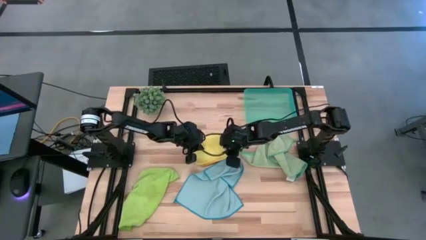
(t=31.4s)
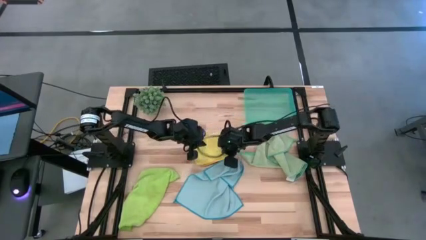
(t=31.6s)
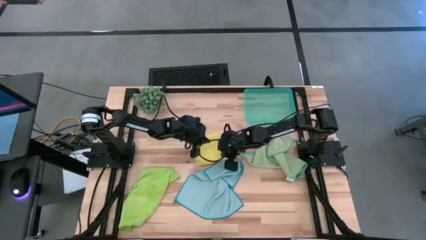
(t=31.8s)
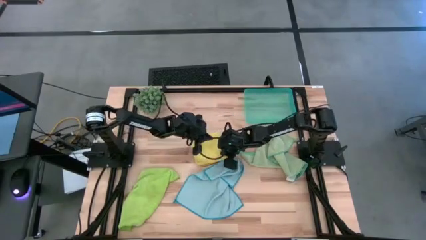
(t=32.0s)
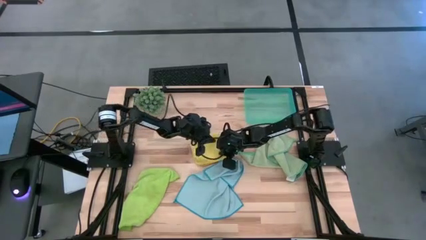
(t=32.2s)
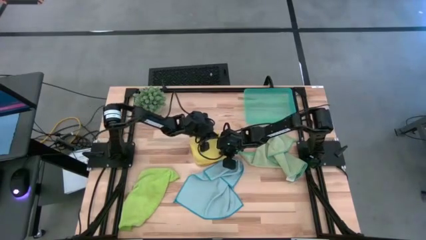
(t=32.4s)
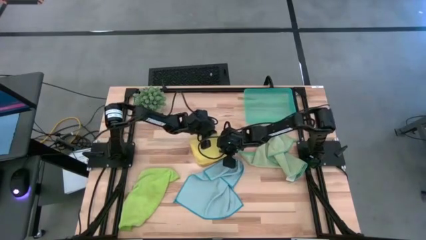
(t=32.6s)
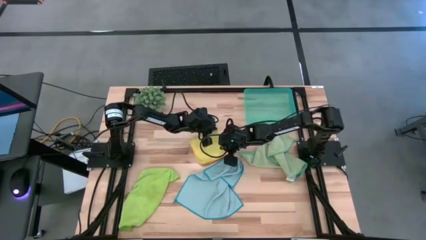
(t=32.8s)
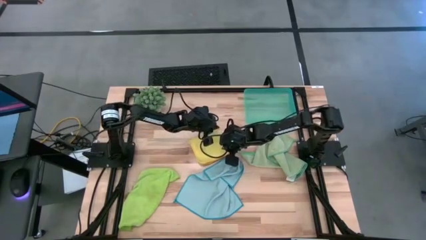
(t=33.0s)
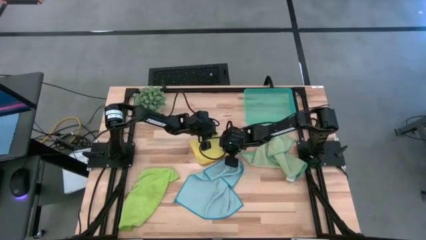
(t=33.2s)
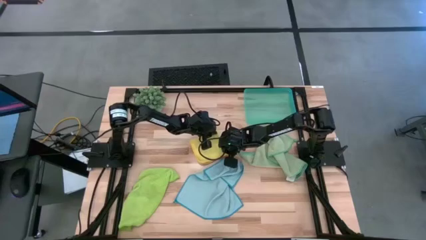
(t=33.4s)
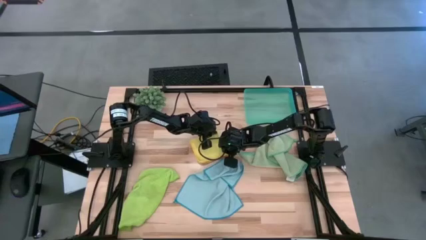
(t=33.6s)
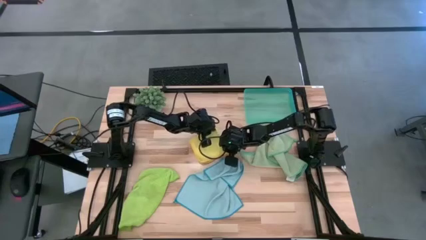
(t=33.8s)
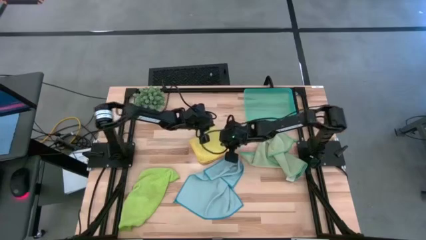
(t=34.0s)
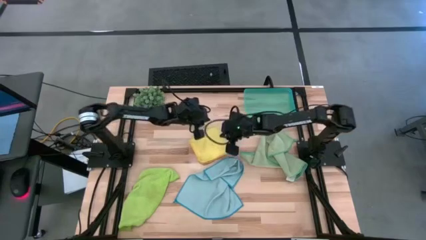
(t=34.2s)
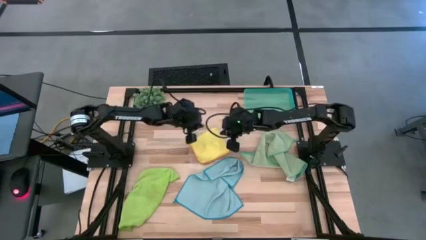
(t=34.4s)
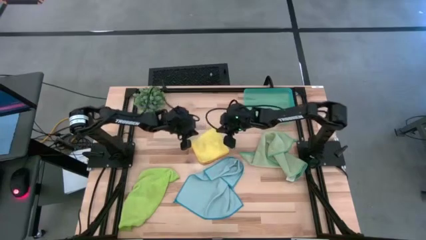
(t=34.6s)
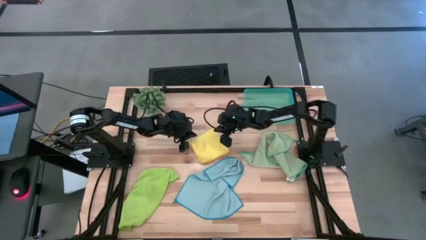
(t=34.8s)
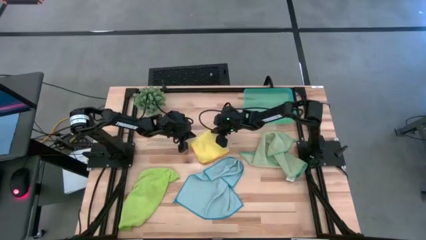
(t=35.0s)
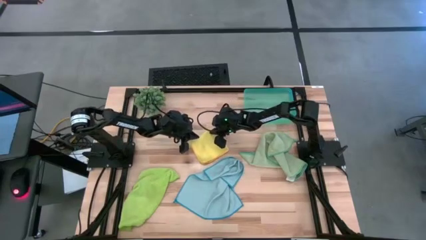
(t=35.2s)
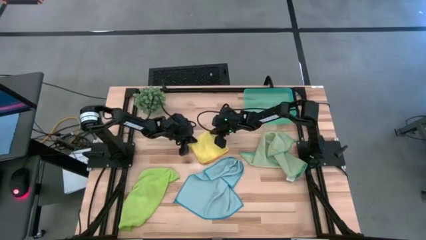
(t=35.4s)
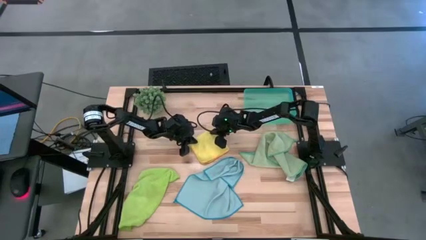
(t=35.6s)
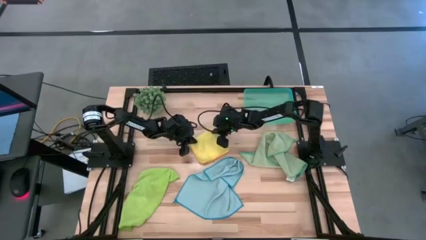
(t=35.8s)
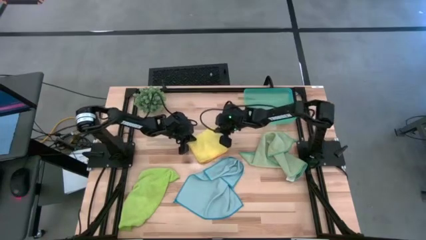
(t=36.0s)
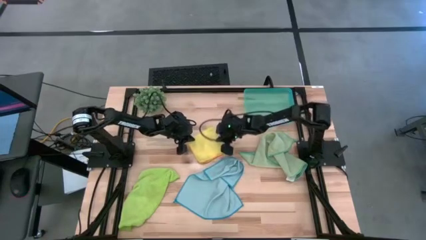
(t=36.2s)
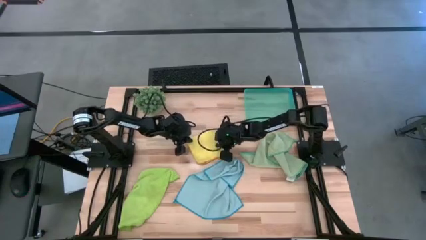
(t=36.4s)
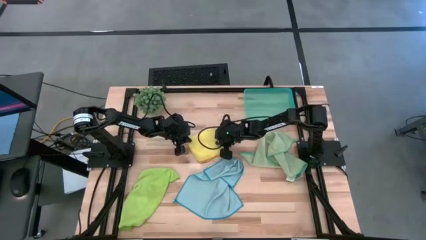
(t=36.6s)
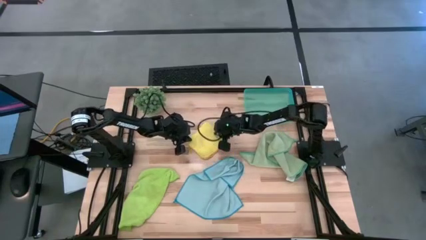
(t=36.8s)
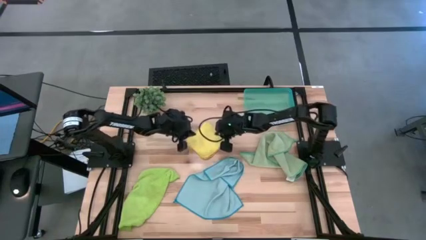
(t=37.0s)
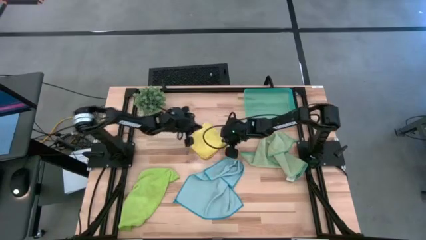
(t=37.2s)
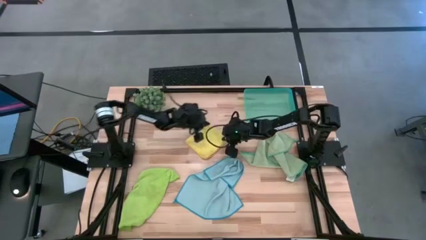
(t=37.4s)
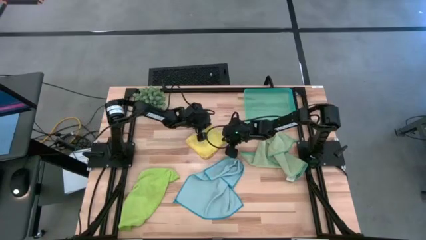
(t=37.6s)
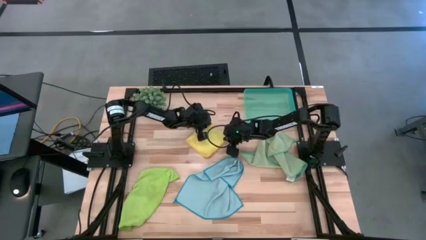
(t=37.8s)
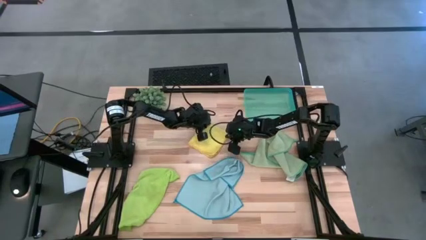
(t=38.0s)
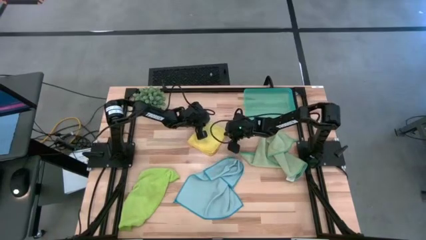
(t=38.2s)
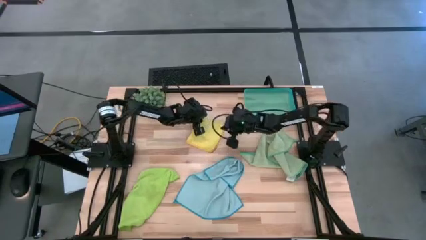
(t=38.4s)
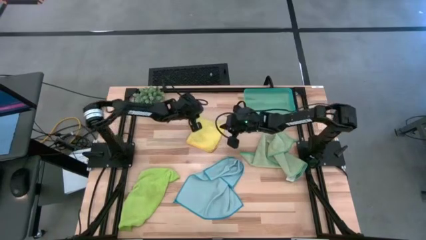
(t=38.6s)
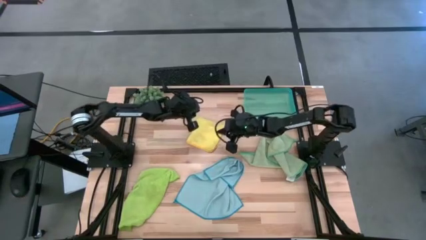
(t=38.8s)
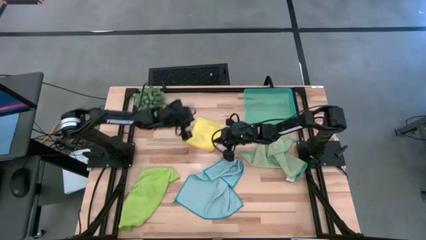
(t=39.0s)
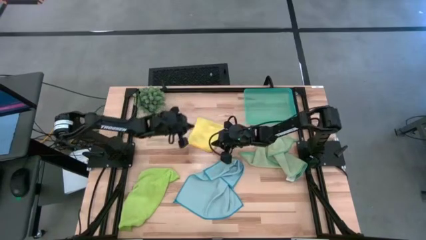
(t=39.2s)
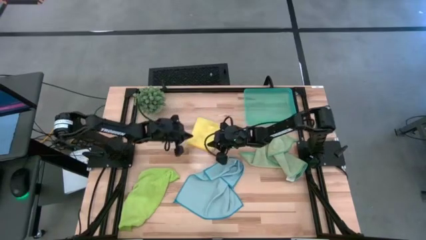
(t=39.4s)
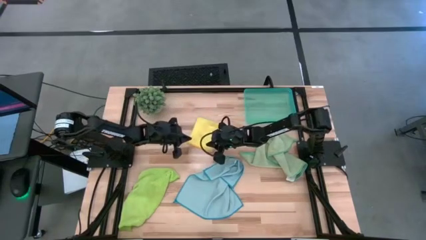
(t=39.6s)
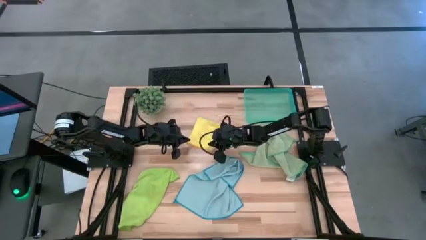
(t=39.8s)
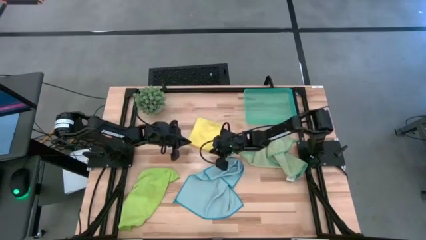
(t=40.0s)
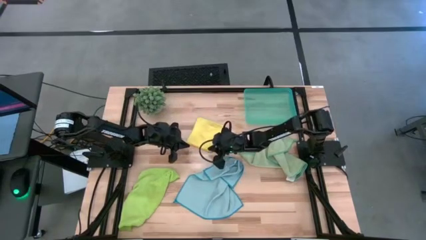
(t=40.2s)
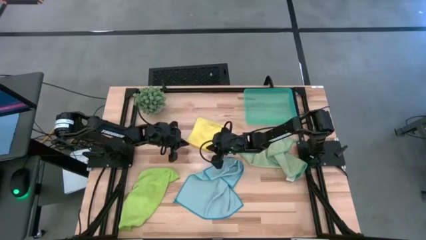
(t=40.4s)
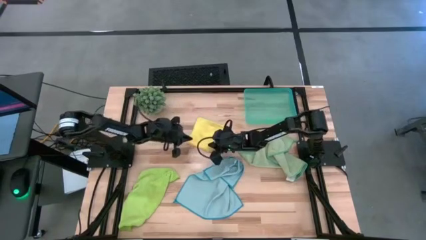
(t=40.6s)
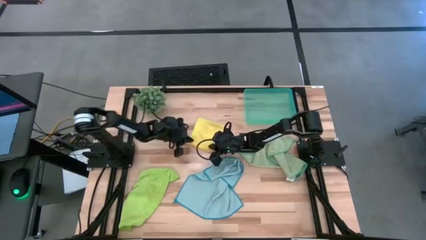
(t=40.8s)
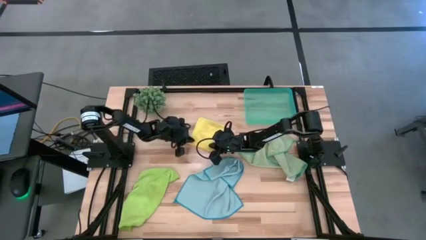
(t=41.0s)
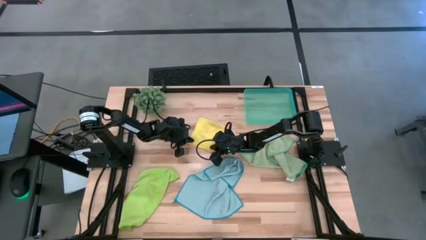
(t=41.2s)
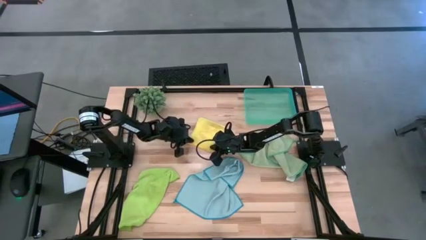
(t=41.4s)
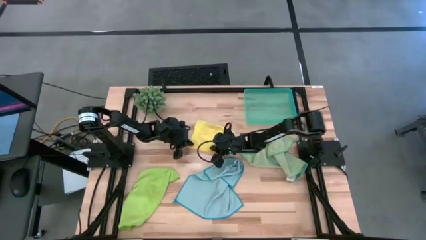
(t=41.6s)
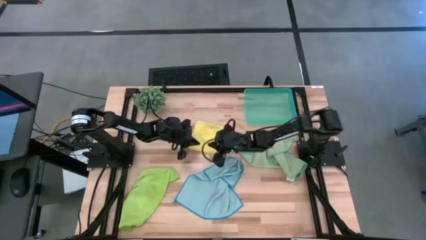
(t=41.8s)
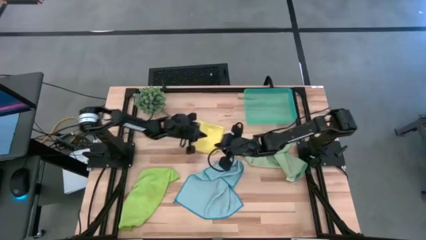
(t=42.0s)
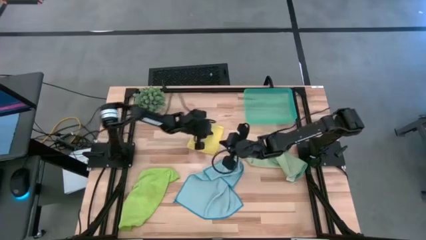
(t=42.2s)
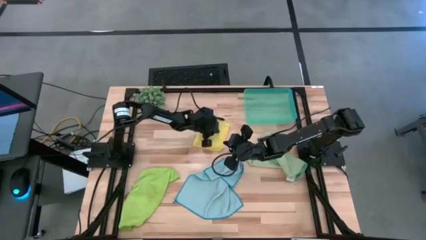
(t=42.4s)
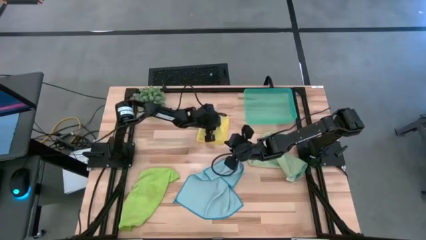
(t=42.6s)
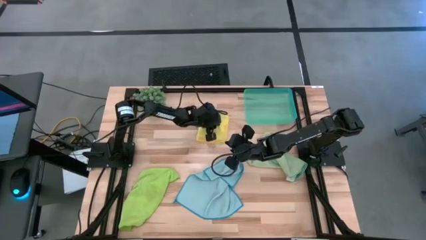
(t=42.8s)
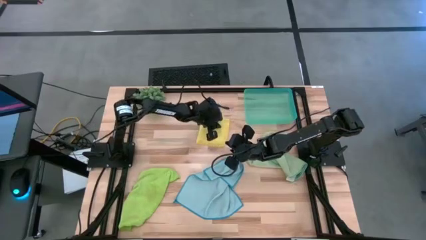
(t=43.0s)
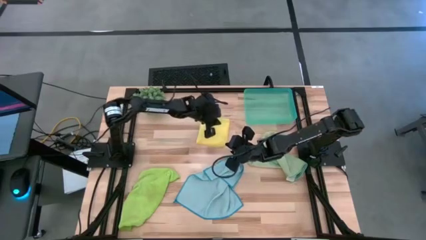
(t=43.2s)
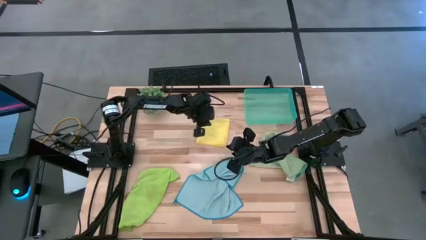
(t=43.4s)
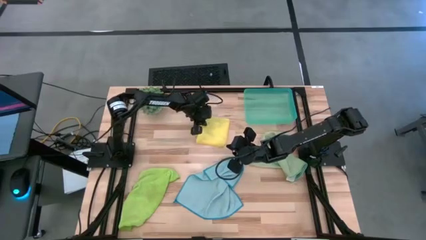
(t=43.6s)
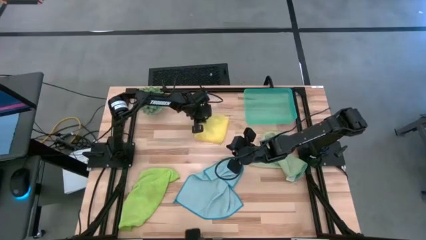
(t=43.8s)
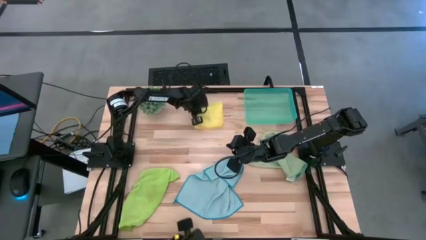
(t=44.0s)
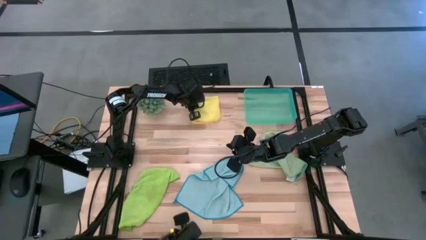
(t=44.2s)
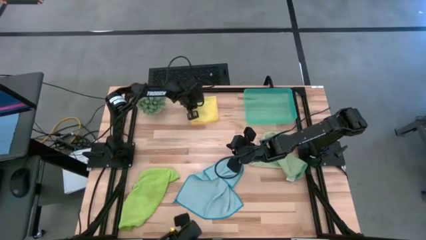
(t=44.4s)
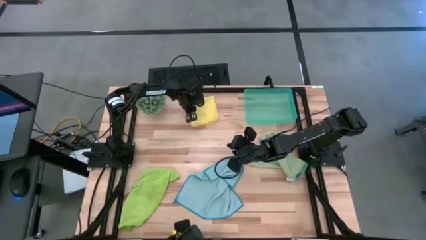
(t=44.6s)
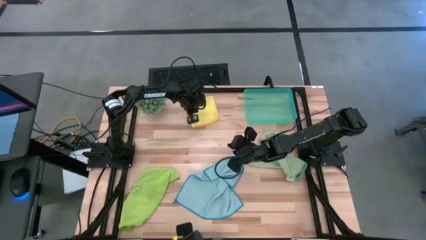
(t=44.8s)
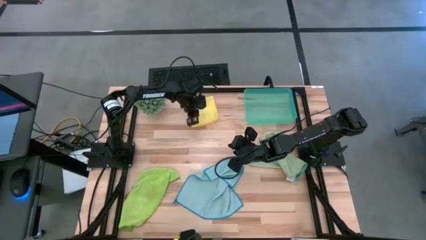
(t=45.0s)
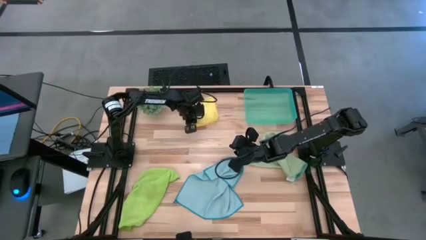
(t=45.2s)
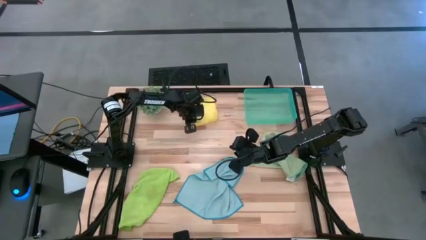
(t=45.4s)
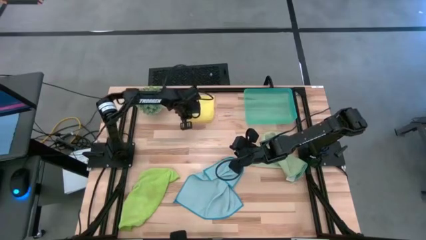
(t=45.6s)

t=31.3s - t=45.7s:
Task: Fold microfiber towels
Fold the yellow microfiber cloth

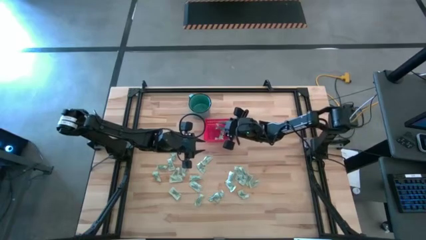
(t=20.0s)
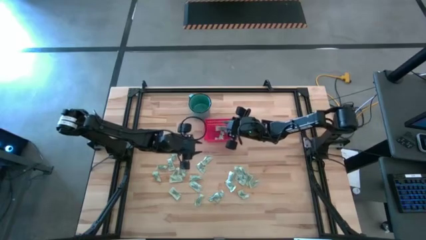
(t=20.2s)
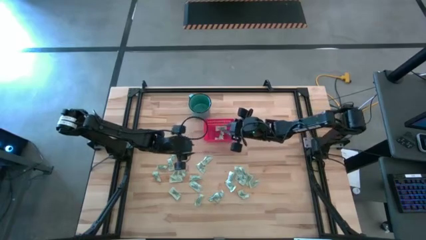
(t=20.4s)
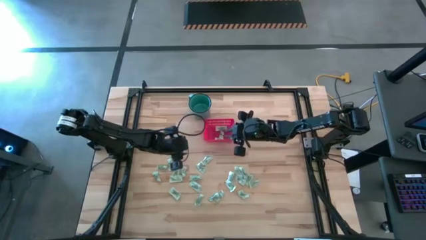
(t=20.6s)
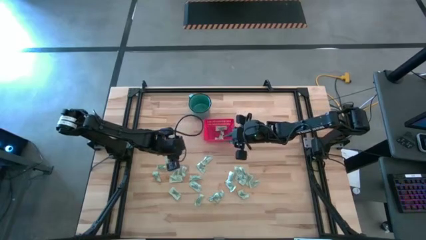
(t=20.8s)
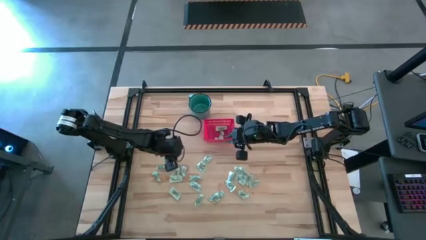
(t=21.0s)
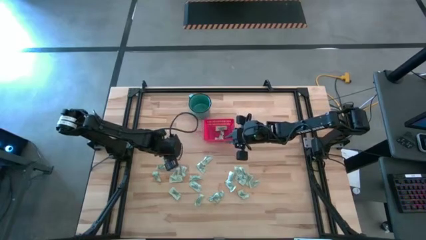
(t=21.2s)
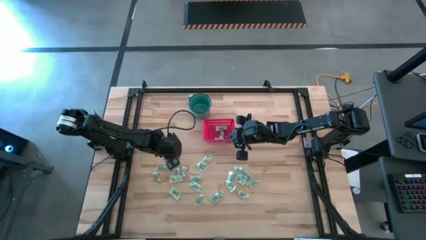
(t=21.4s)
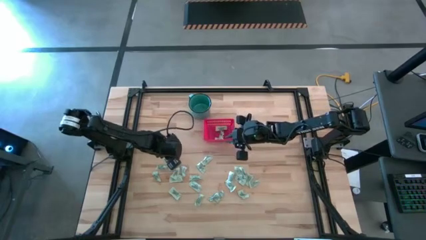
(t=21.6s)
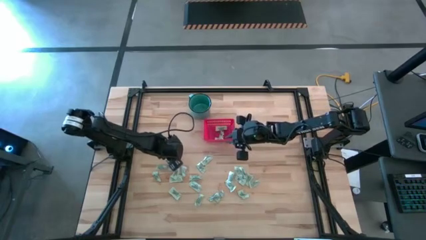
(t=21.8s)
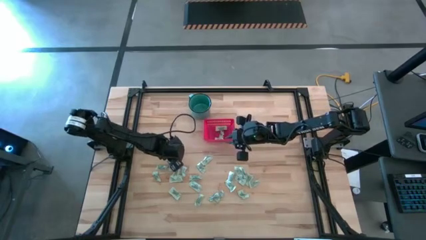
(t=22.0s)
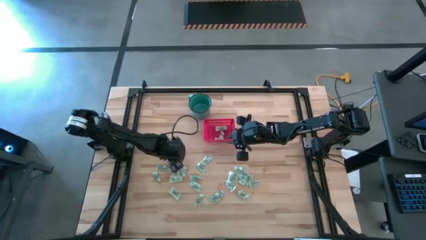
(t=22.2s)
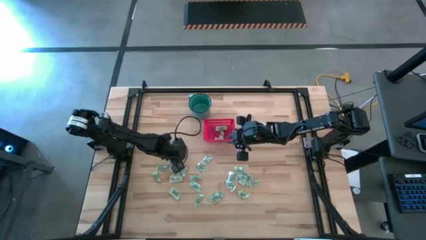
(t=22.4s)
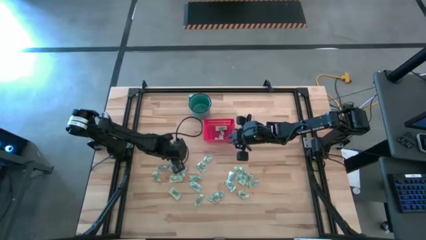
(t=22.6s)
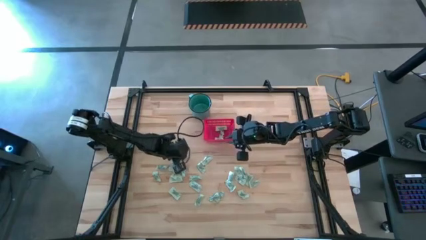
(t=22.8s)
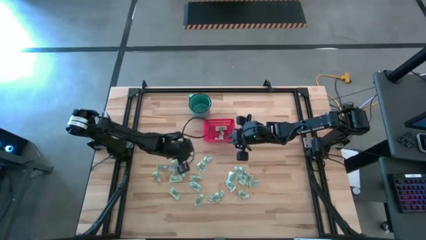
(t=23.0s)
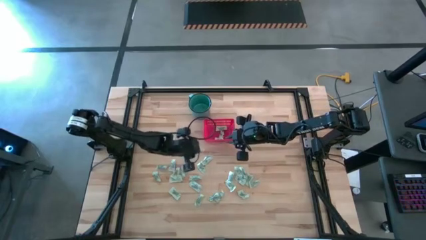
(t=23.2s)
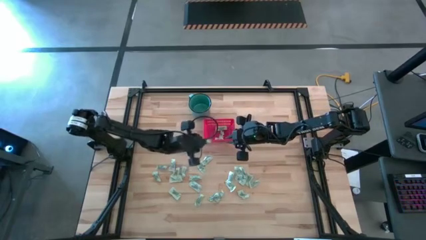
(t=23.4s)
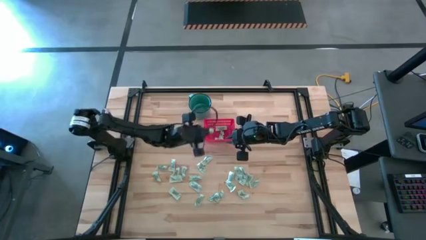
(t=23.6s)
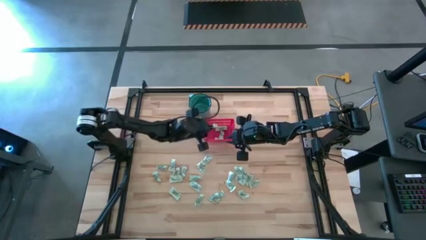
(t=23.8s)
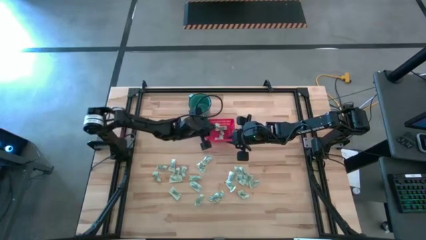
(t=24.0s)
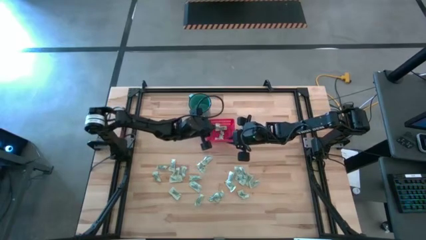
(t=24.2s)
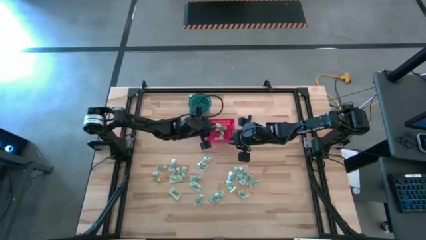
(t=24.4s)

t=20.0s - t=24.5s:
Task: Pick and place items into bin
Put the light green stevia packet into the red bin
